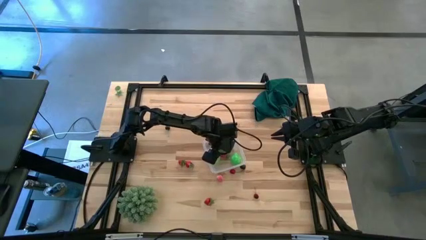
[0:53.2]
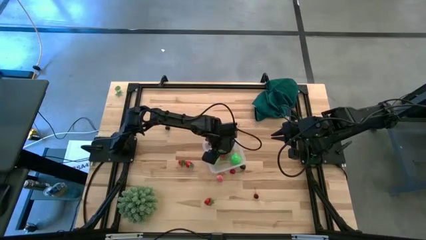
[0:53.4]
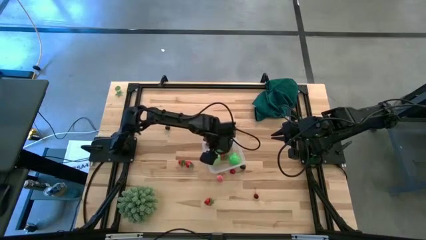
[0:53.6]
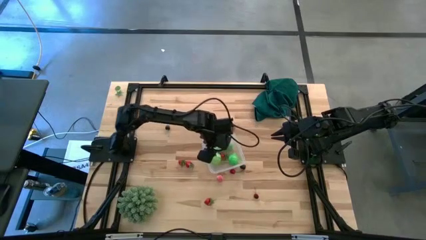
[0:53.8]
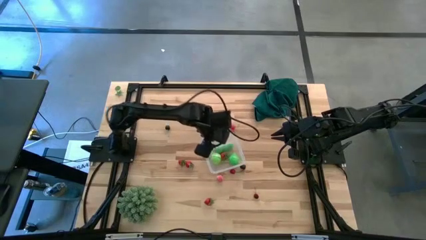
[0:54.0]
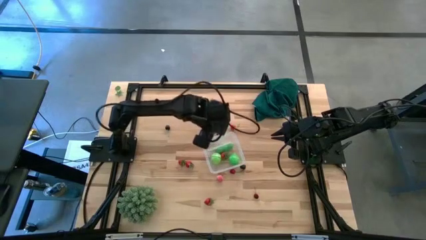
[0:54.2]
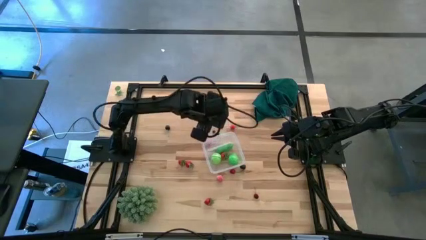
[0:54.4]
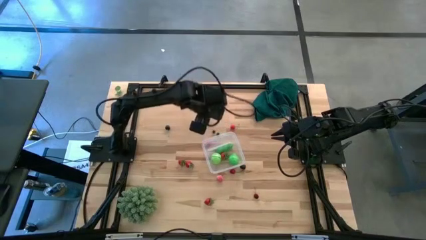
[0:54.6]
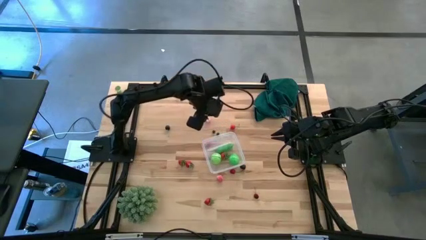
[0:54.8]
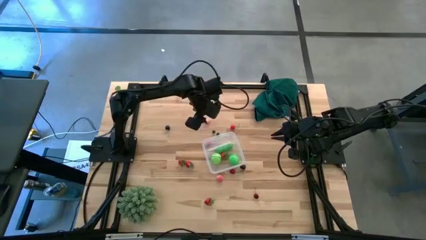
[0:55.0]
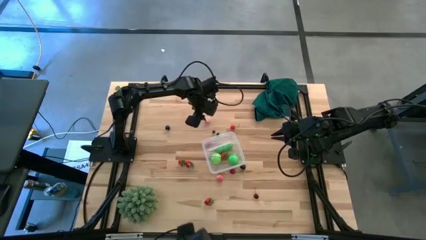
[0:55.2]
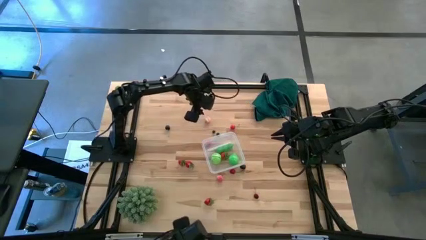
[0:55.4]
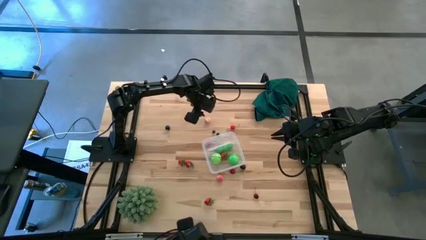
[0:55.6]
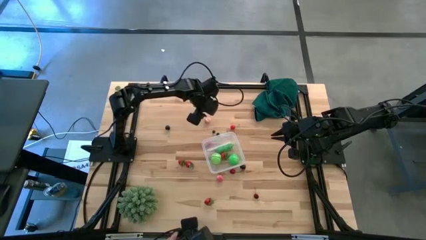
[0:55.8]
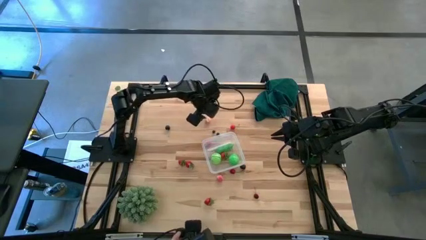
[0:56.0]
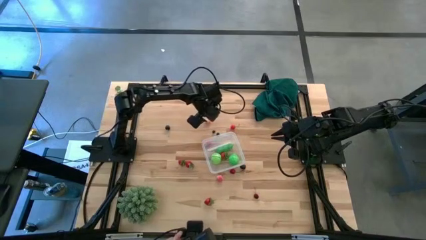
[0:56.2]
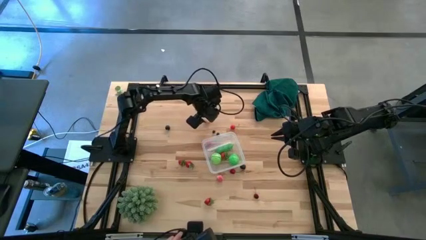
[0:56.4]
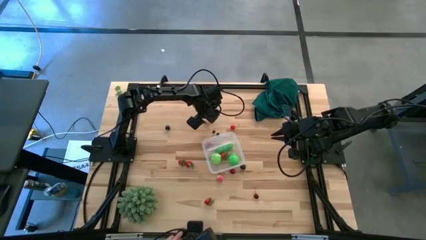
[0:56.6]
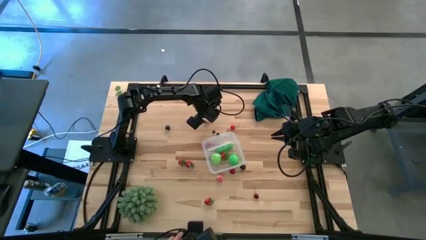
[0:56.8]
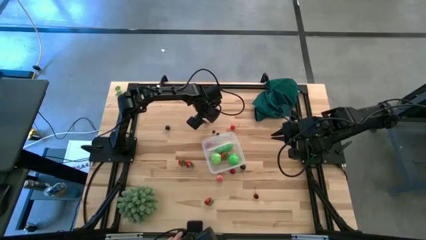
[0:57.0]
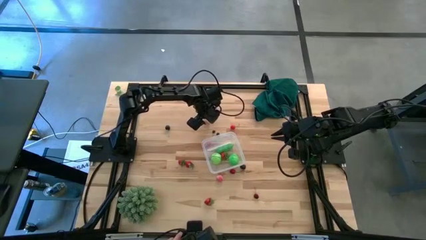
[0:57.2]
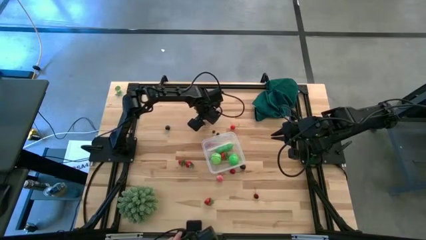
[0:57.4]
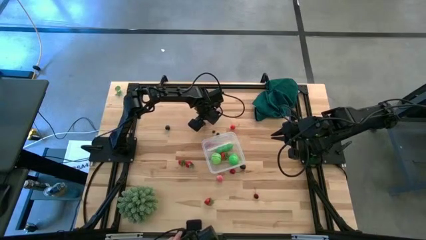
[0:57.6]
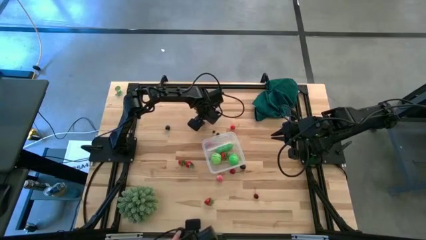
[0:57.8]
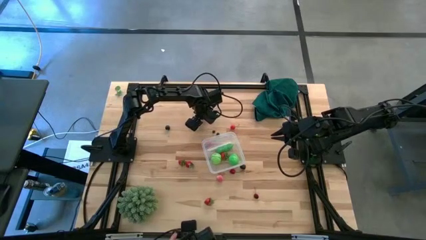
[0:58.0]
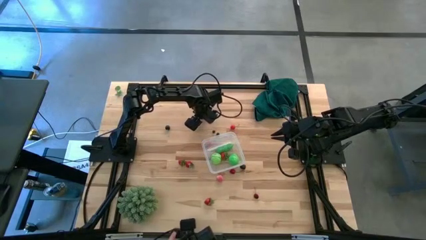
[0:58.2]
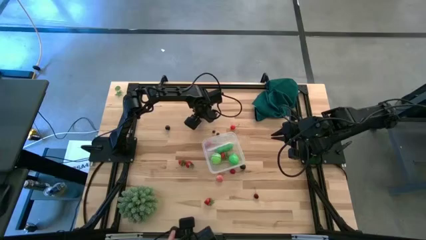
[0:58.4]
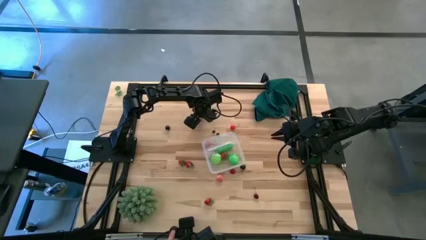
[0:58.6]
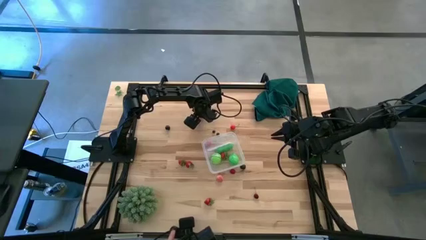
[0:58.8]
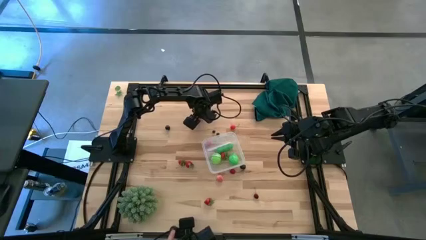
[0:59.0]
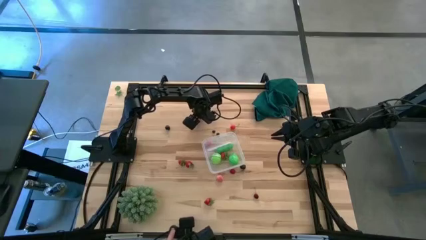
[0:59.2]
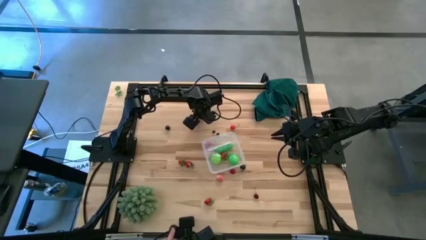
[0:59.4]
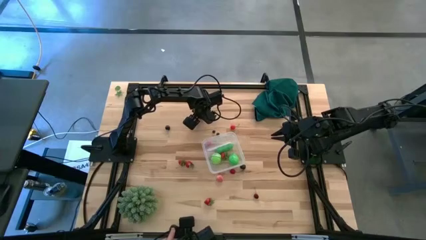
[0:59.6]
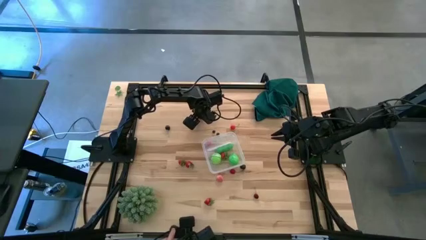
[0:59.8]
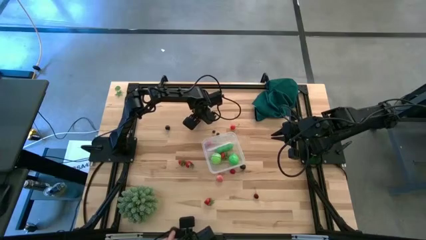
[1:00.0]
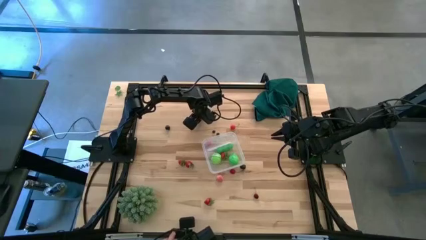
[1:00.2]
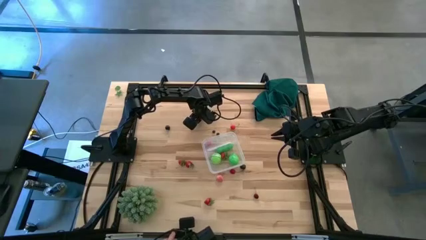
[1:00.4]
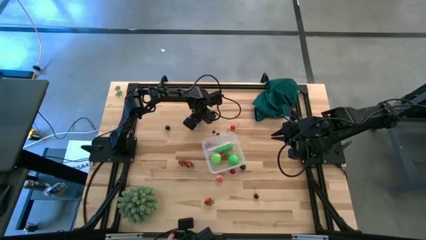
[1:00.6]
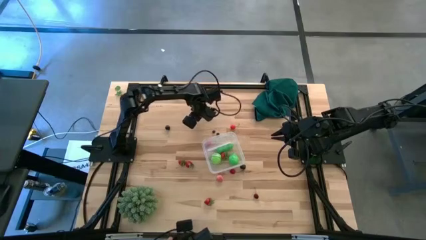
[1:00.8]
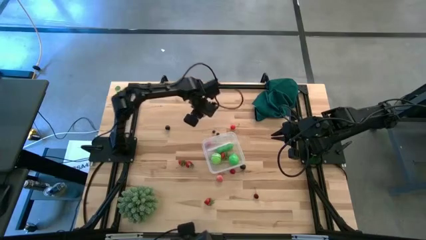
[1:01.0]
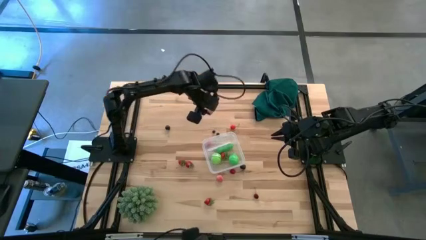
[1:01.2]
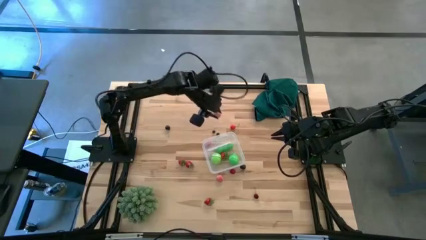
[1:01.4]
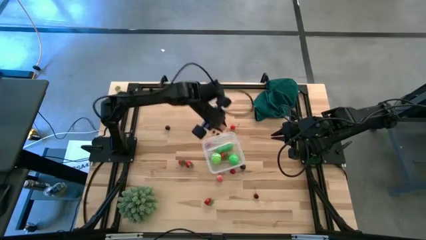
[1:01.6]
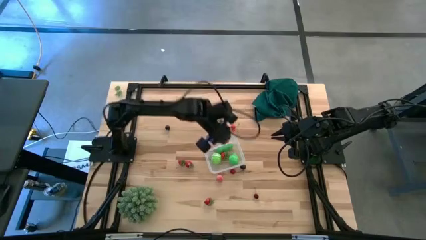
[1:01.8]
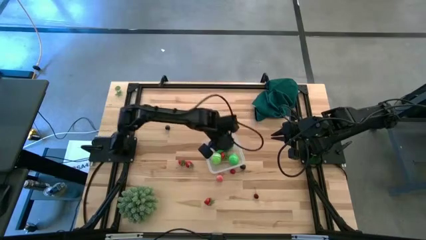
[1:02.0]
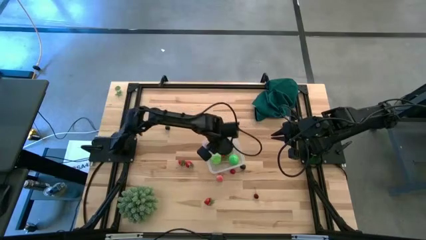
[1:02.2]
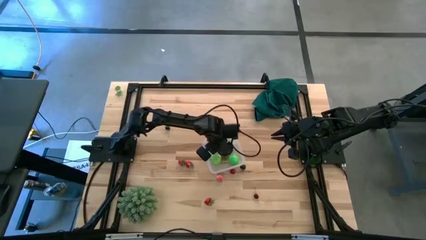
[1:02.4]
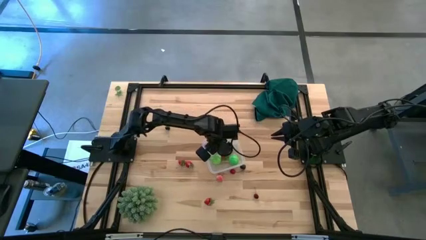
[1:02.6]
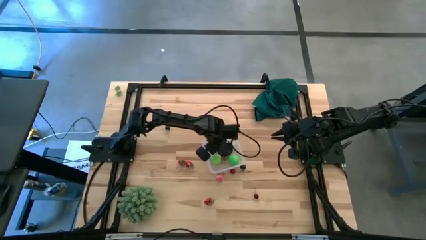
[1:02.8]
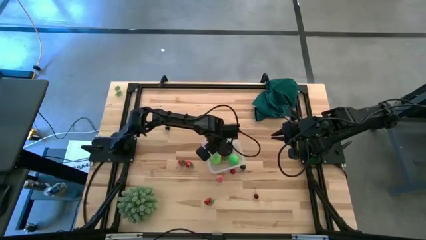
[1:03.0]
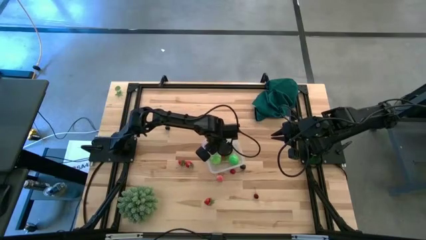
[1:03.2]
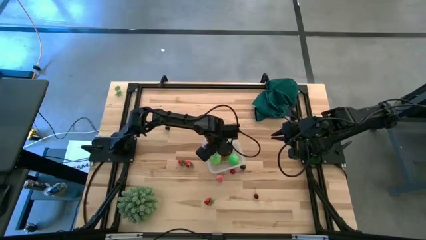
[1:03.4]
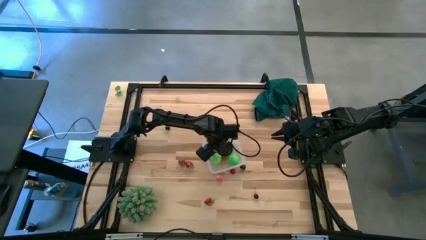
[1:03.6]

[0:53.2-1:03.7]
Task: Pick and placing Produce into tupperware
Put the pink peach into the transparent container

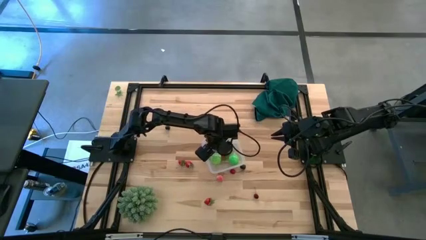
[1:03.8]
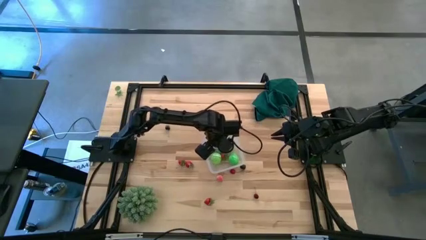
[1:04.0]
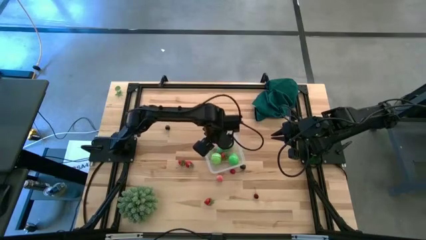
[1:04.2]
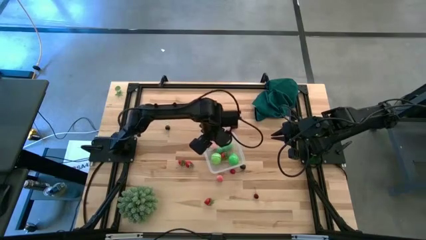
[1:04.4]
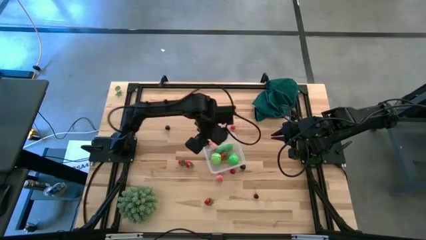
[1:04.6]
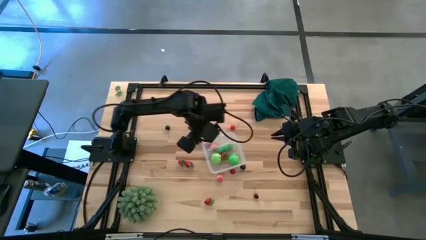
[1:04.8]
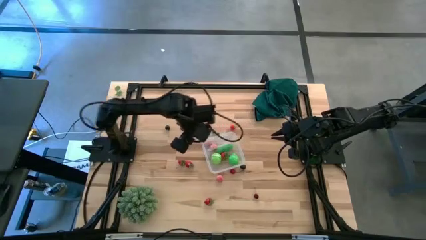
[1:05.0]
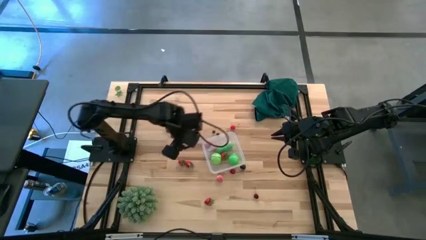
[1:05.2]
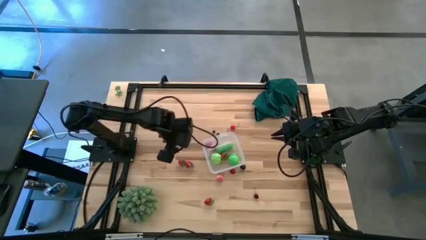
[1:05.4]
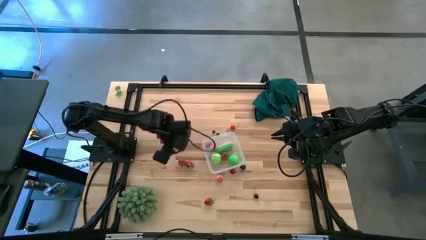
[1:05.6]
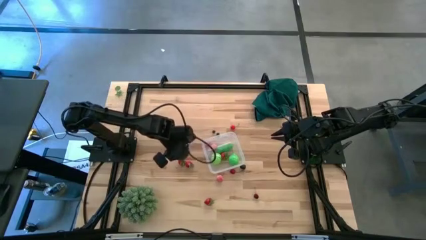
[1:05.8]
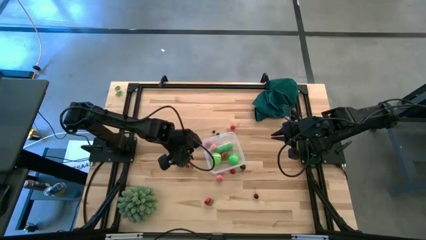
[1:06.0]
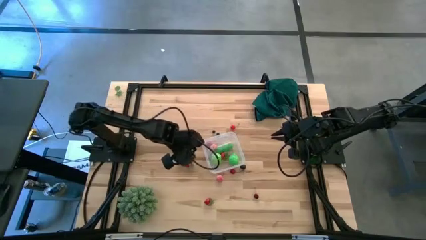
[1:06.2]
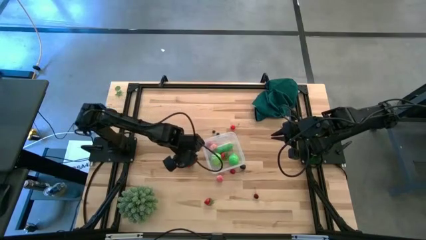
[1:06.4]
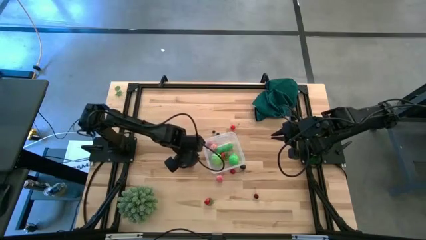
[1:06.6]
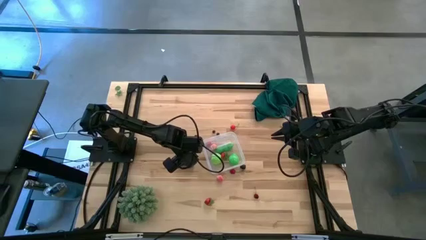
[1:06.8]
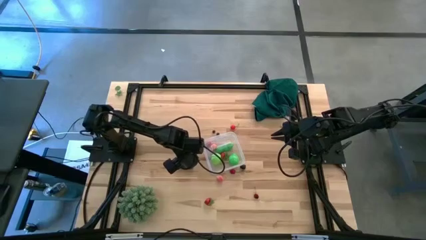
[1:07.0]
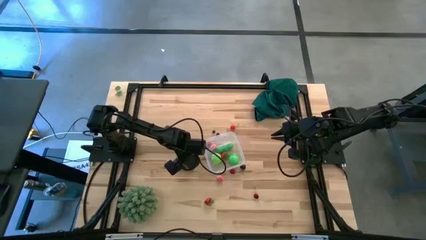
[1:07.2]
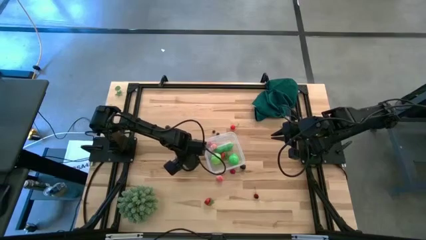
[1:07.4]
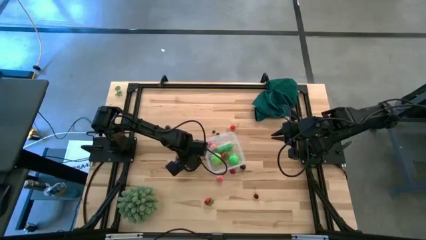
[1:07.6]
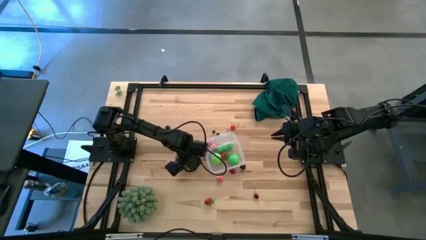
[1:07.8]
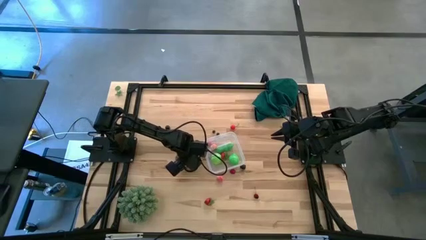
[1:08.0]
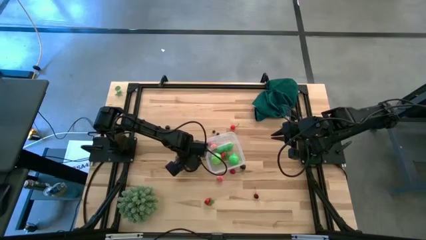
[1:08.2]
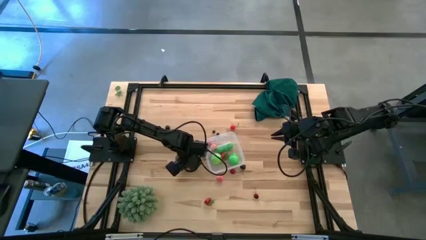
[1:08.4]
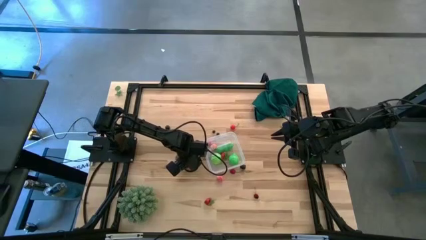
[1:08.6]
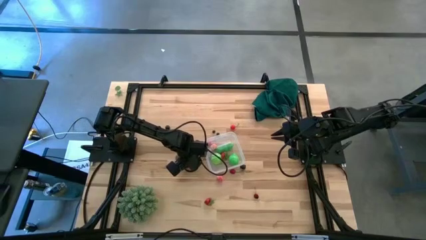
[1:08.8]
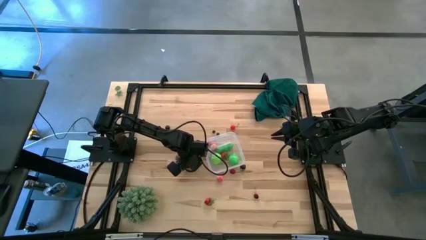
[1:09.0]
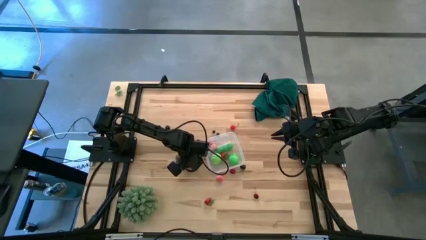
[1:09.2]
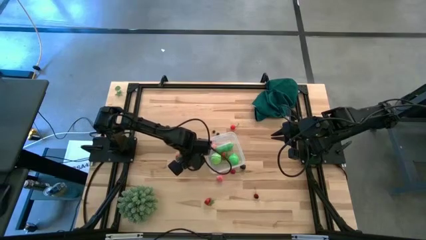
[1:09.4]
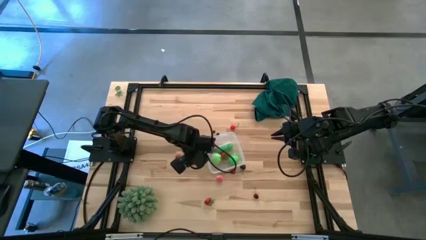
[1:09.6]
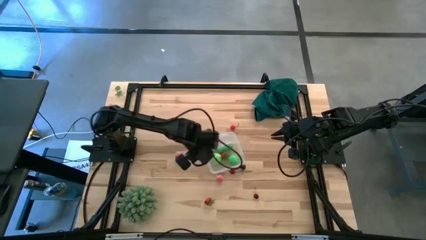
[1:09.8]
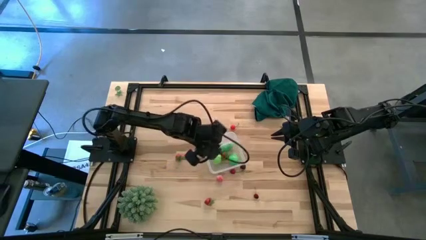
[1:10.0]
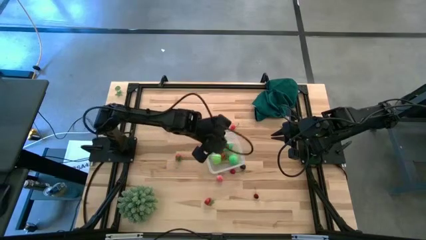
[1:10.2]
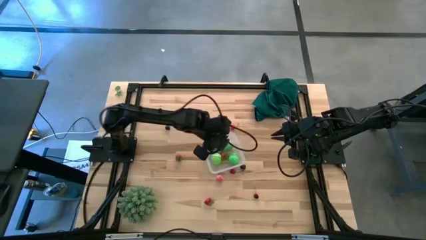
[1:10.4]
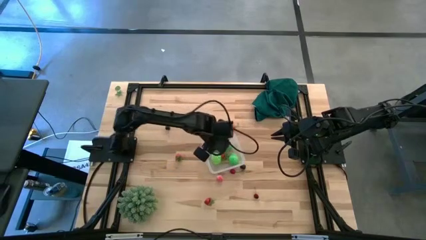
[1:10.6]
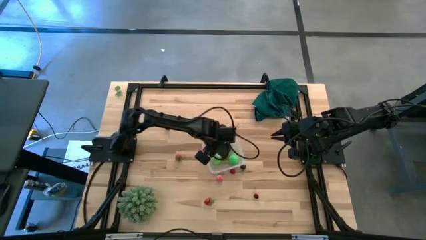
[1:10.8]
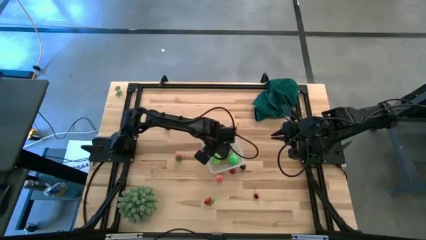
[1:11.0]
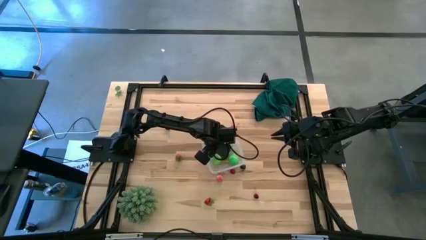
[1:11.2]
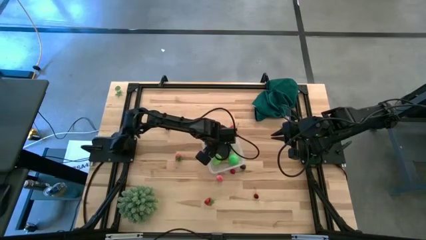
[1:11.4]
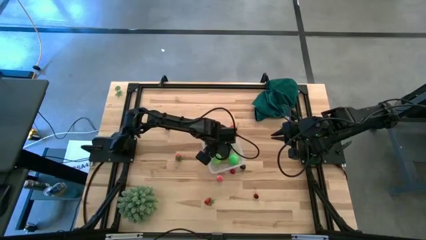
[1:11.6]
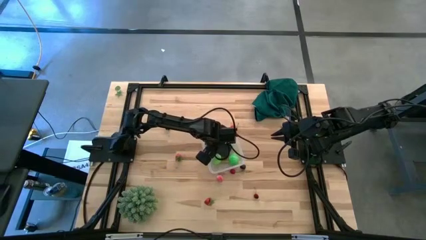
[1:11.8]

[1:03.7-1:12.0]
Put the red strawberry into the transparent container
